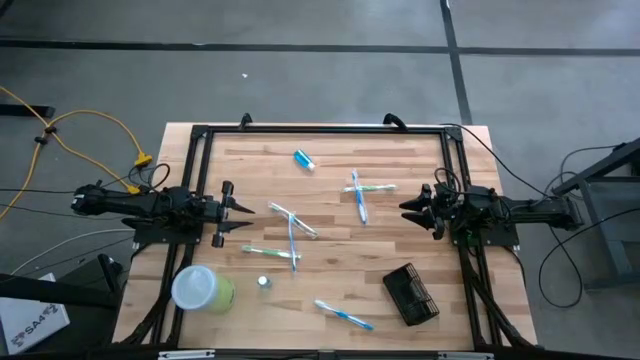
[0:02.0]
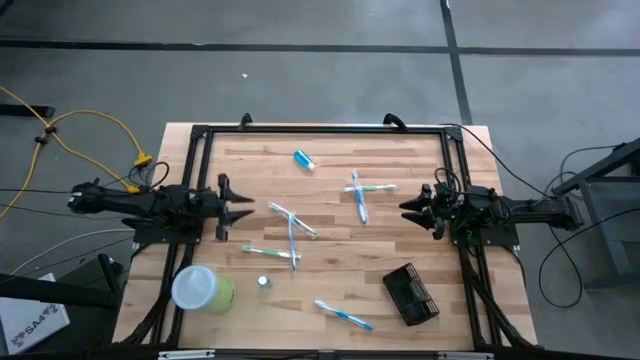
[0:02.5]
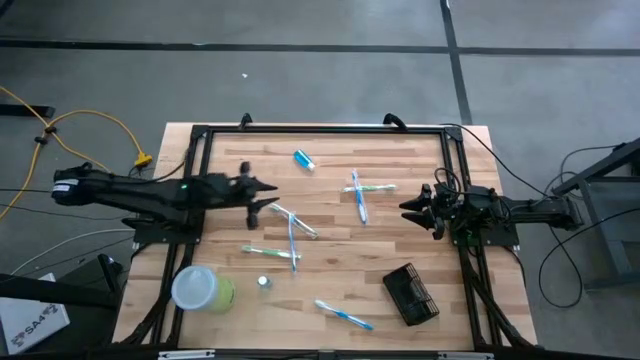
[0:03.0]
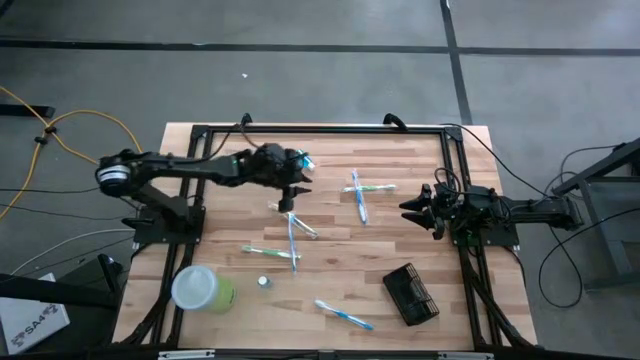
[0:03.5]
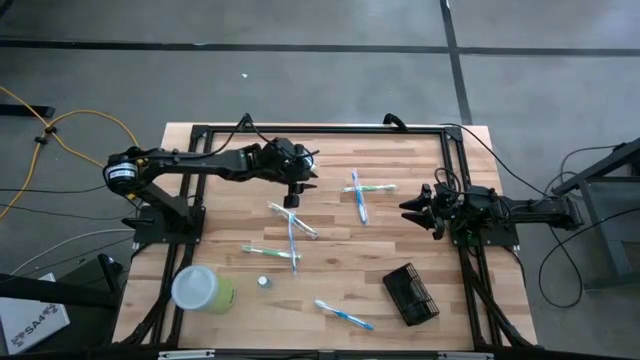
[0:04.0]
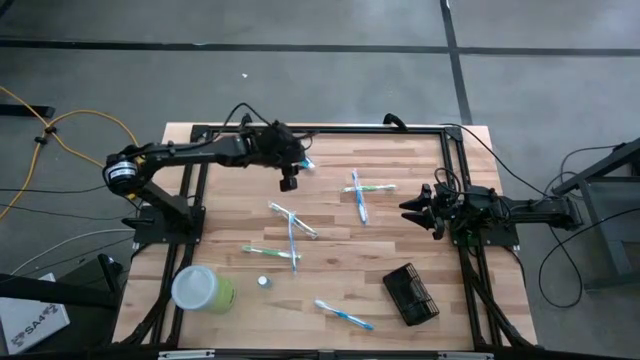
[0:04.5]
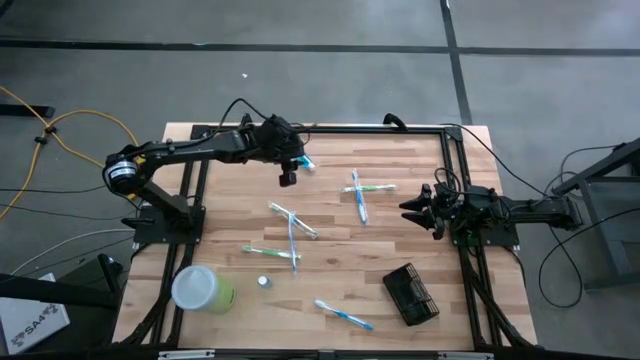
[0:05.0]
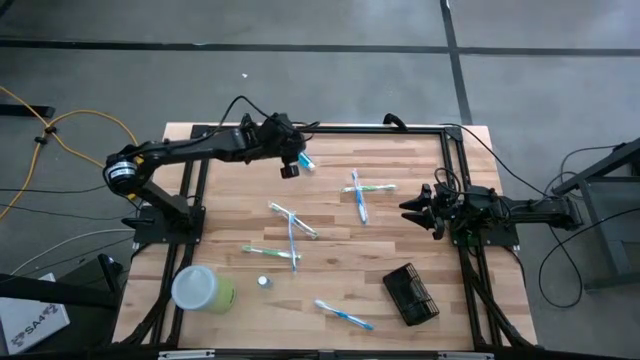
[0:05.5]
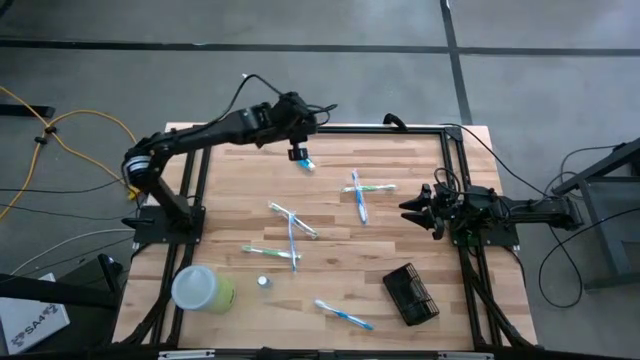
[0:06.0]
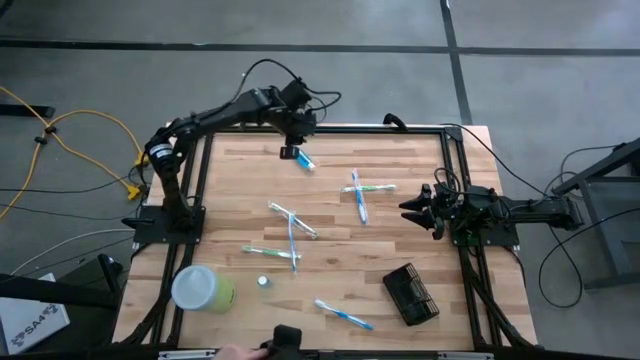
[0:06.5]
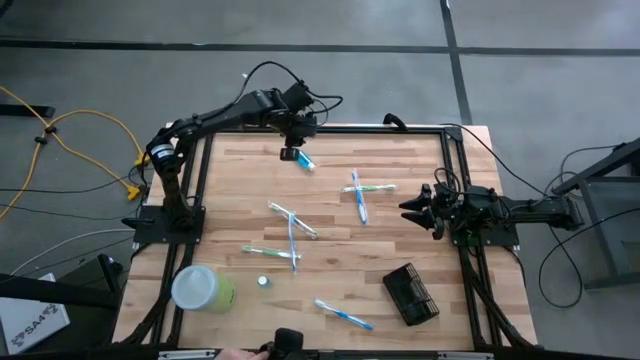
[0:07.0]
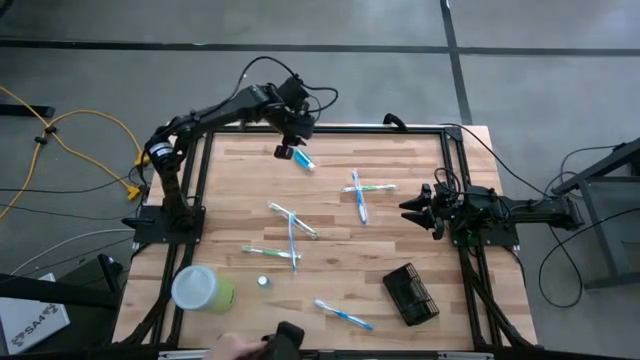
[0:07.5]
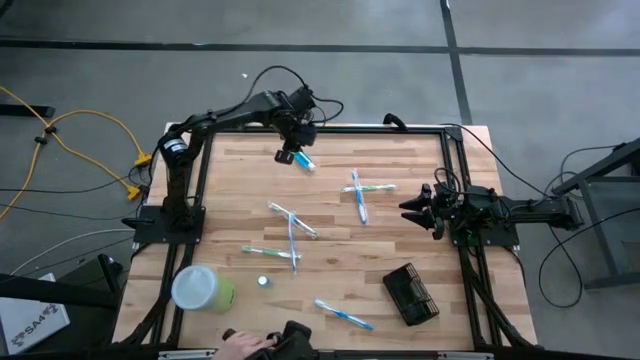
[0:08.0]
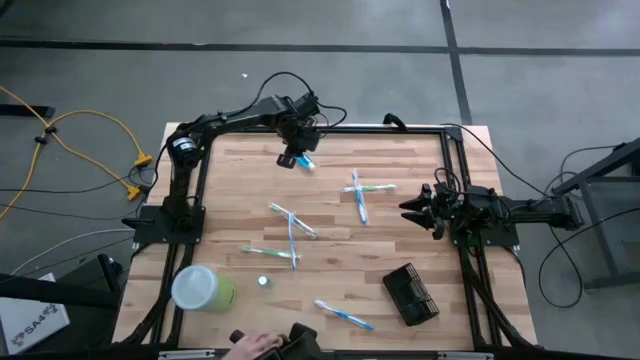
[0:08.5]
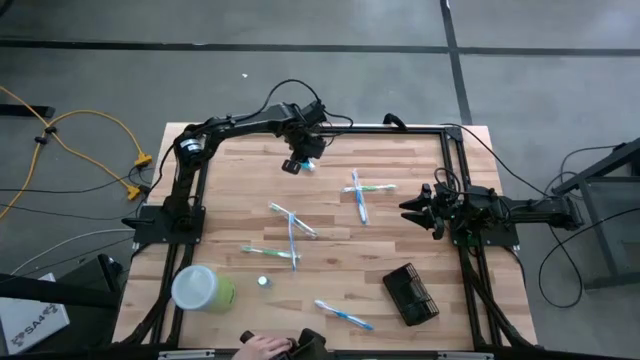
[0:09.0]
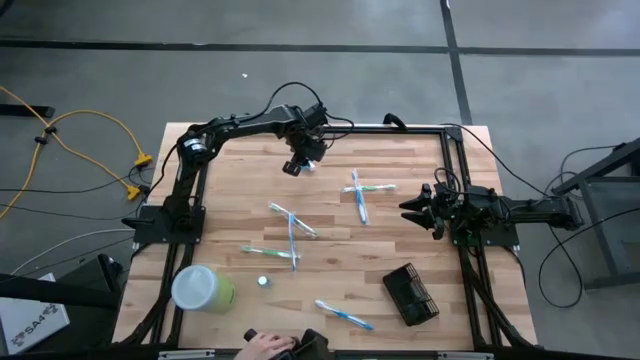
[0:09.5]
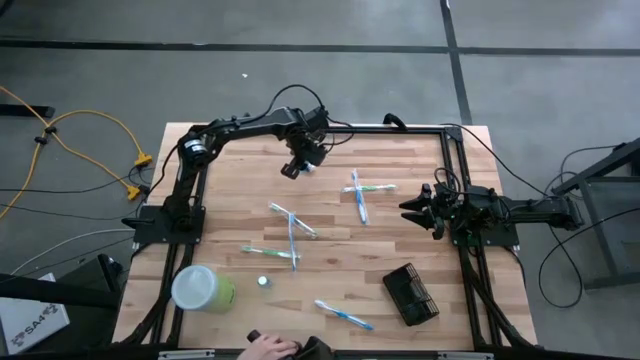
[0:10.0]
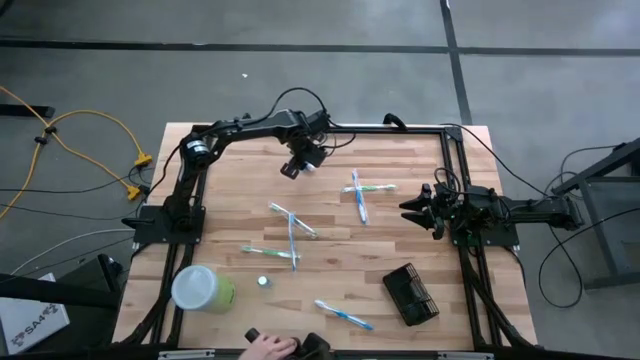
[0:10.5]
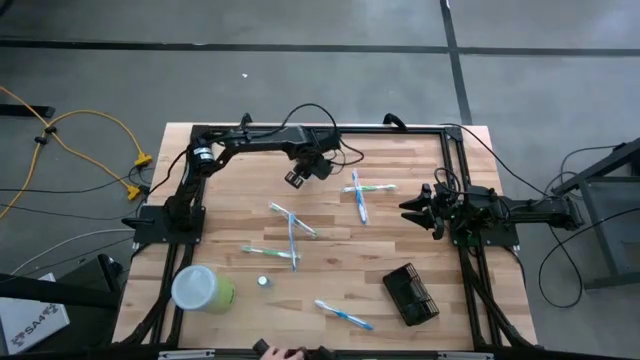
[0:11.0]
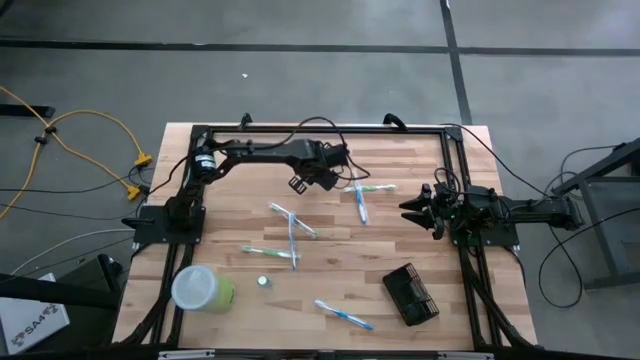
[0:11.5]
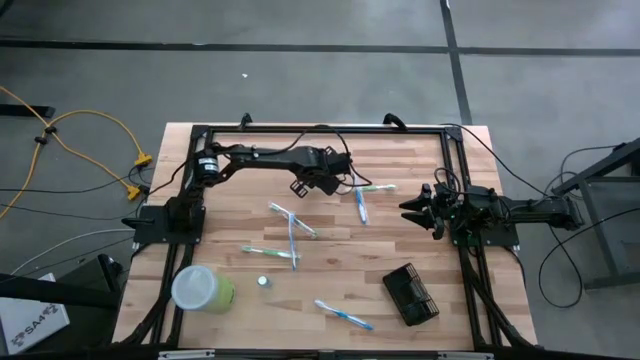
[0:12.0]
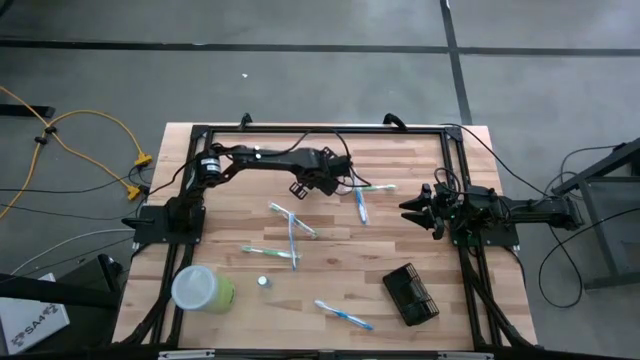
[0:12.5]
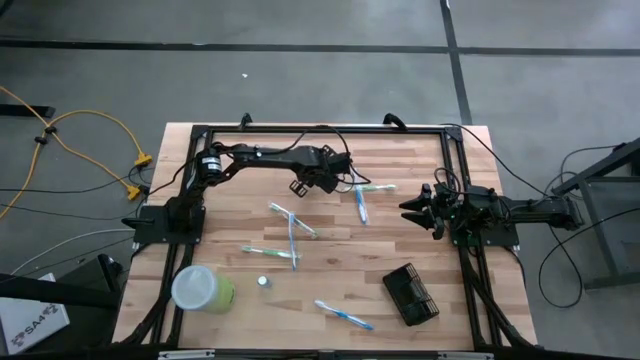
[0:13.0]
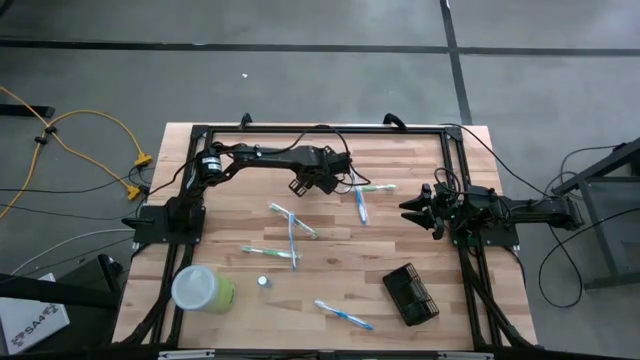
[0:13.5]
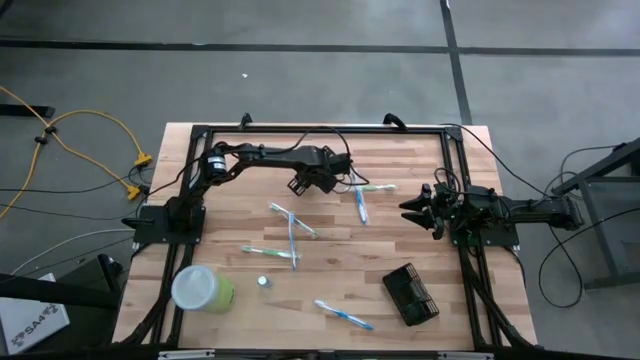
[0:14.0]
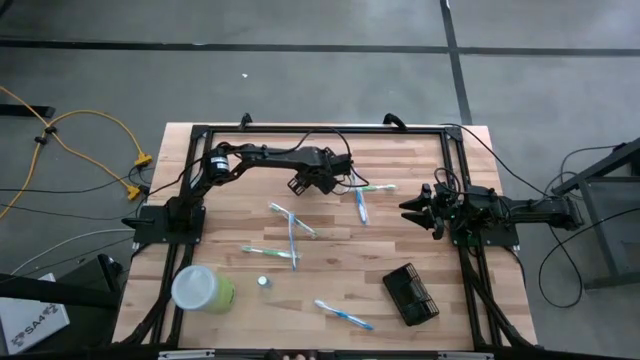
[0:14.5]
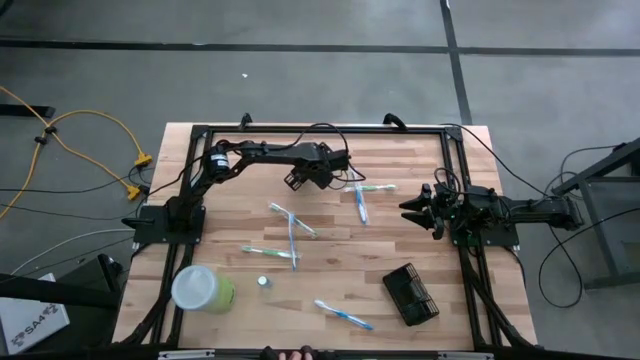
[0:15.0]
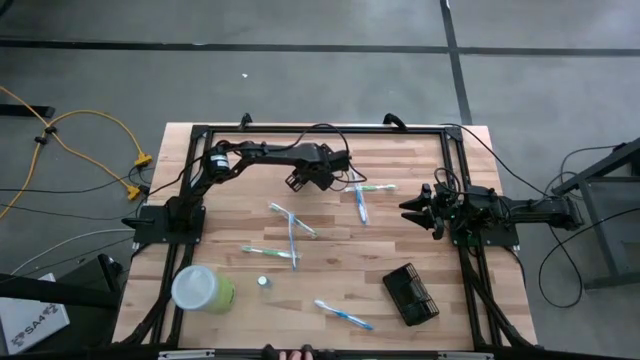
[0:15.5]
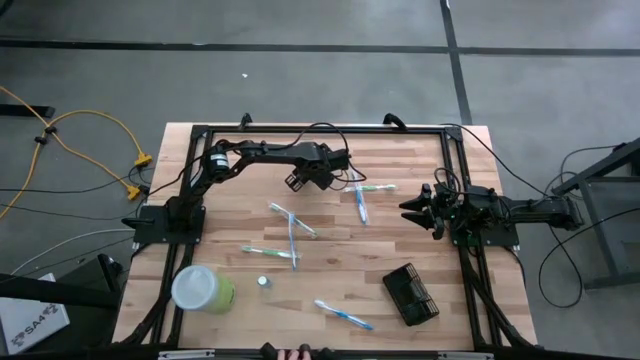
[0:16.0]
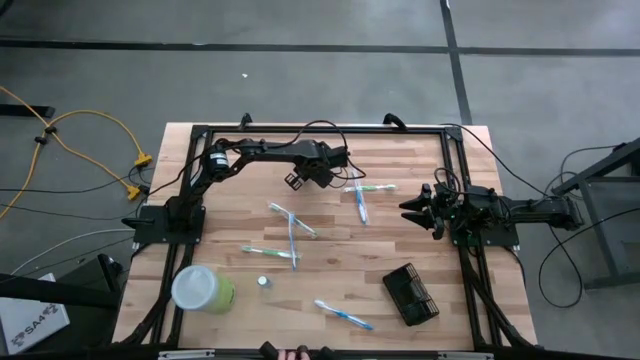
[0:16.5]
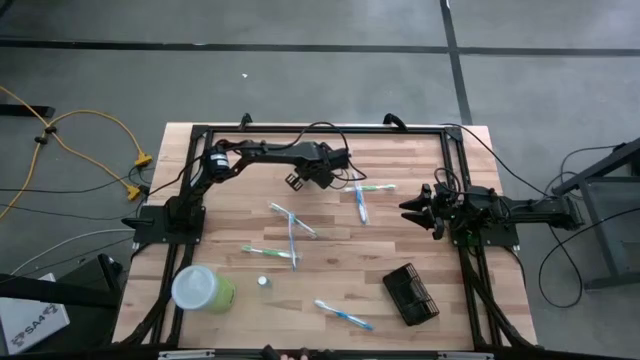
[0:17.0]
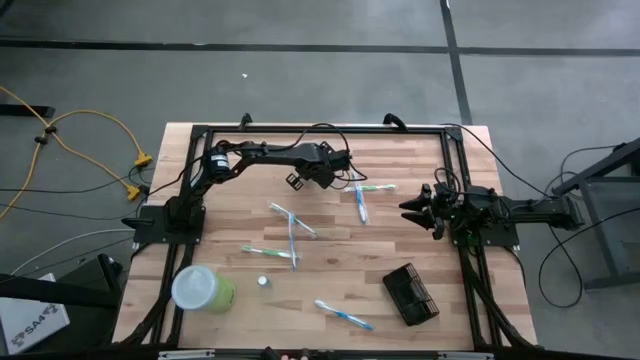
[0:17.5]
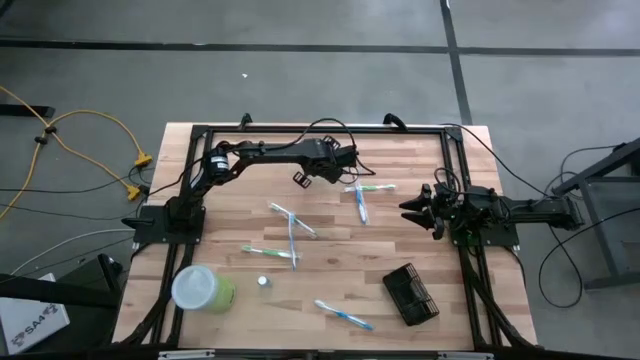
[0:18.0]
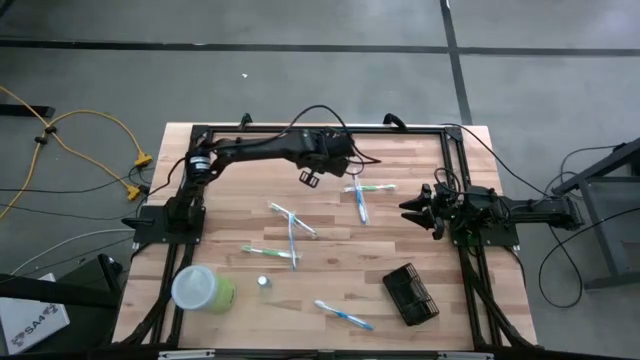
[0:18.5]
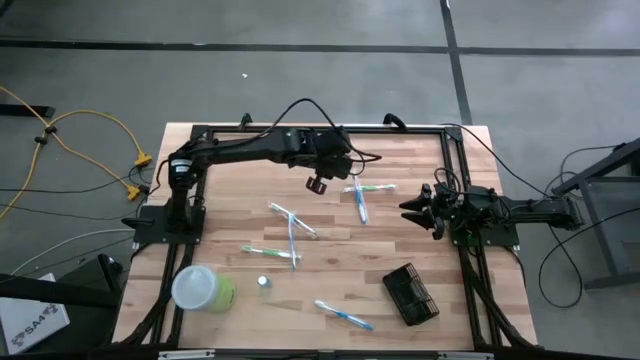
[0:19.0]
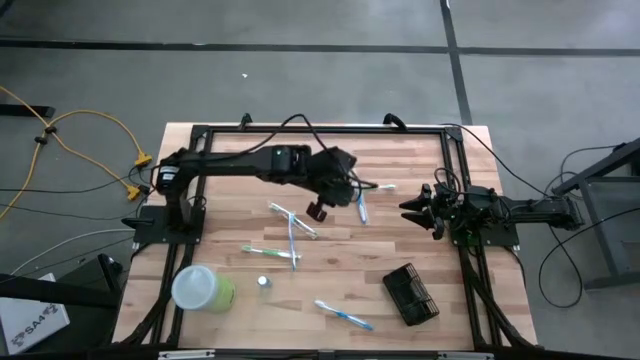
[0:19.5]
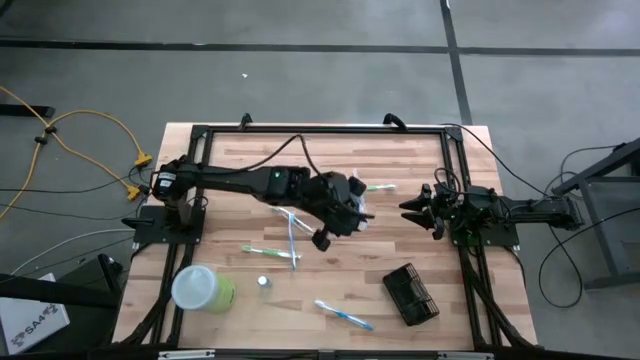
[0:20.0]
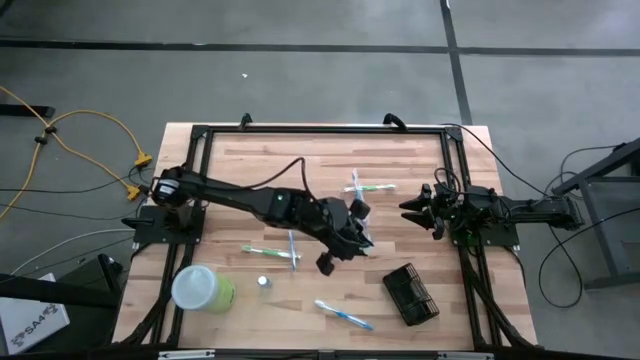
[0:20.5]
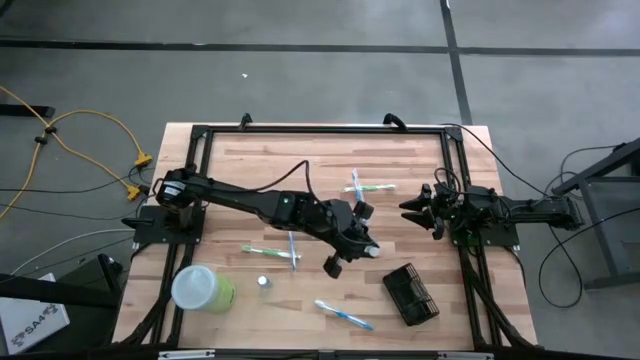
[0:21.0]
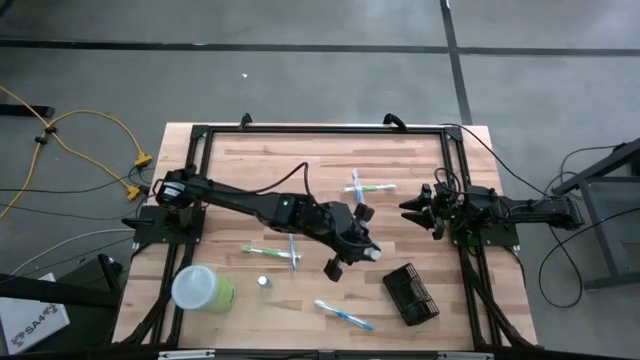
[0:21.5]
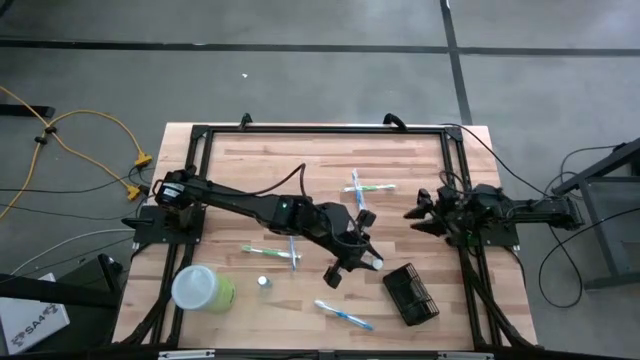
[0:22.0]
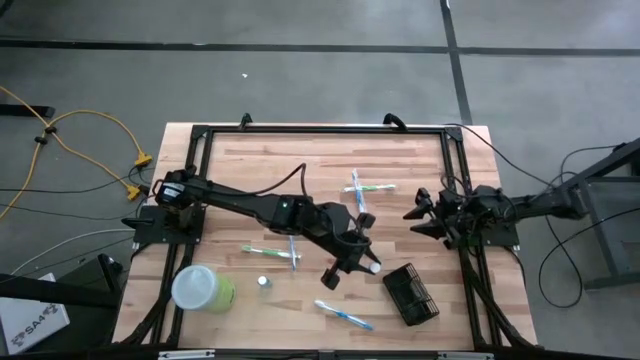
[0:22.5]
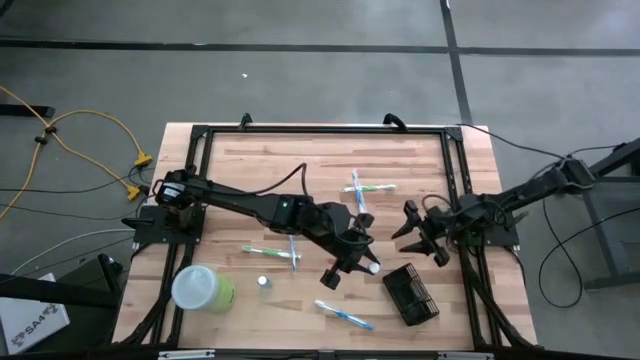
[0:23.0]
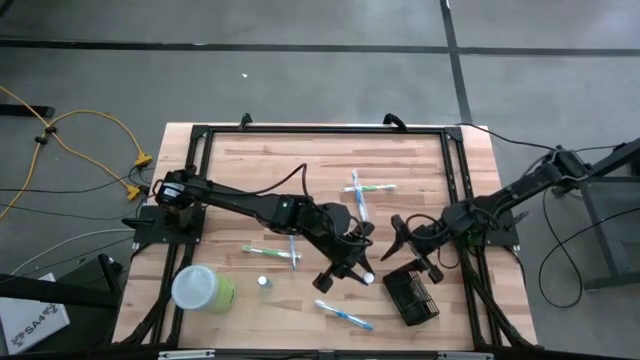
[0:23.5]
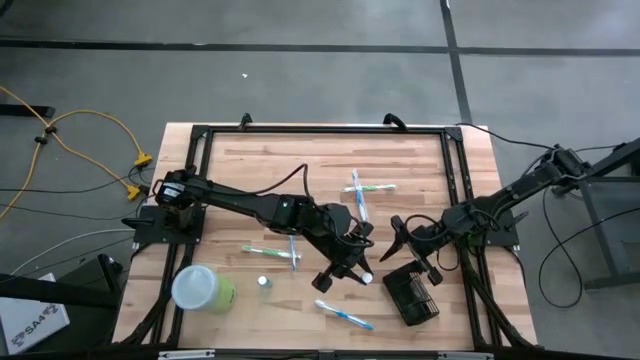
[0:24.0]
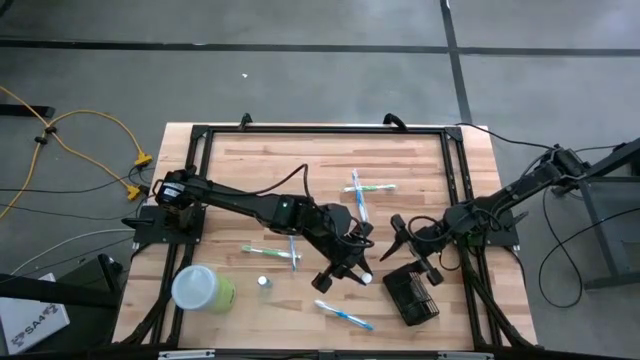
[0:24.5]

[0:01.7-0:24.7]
Task: Pick & Place toothbrushing station
Put the top blue mouthwash into the middle section of the of the black wire organizer
